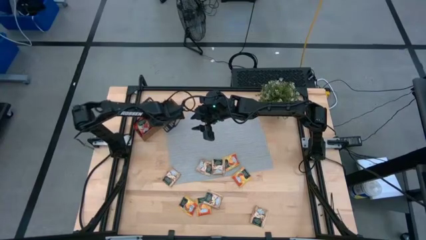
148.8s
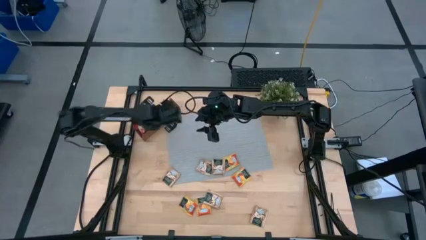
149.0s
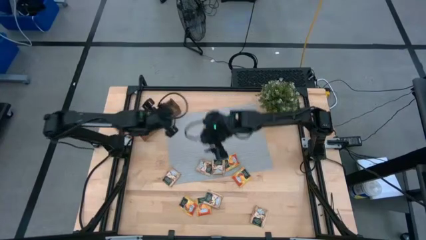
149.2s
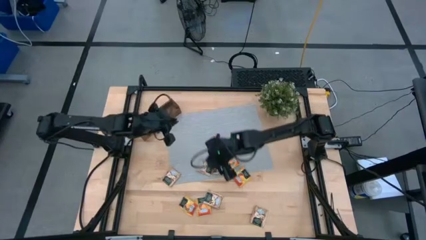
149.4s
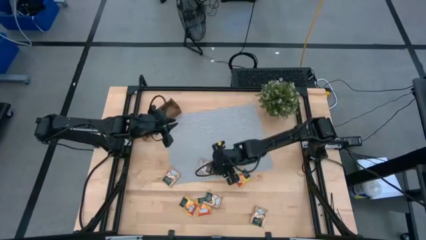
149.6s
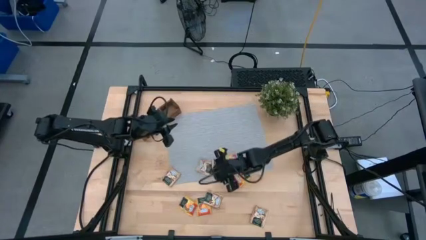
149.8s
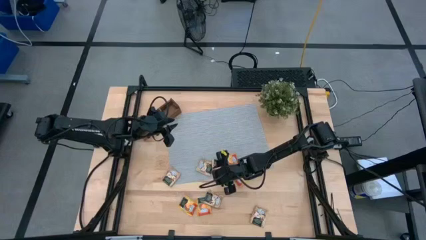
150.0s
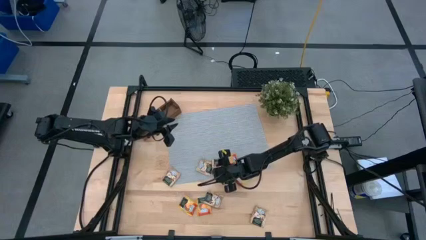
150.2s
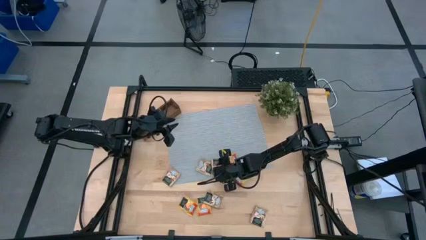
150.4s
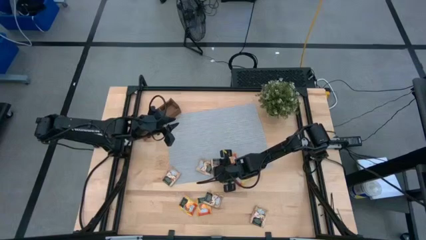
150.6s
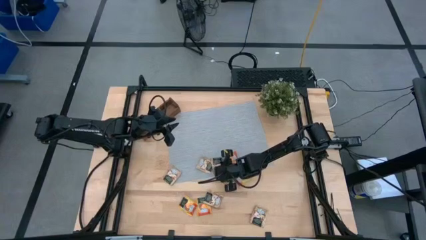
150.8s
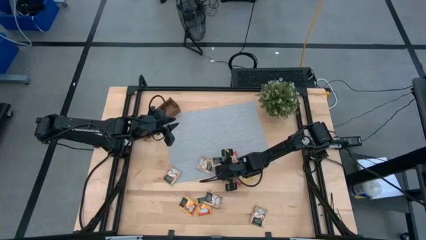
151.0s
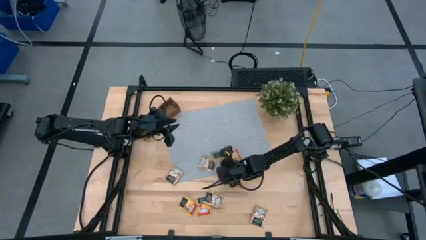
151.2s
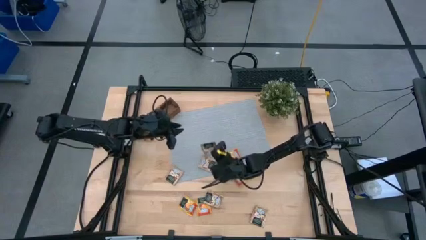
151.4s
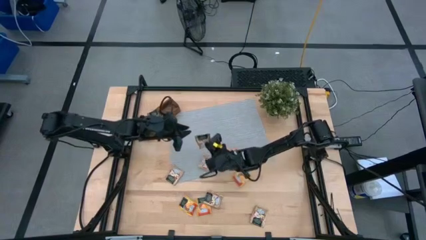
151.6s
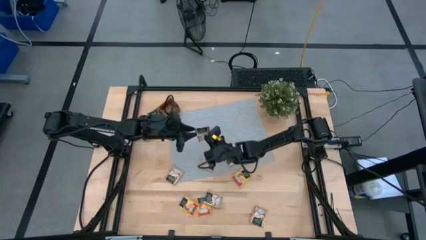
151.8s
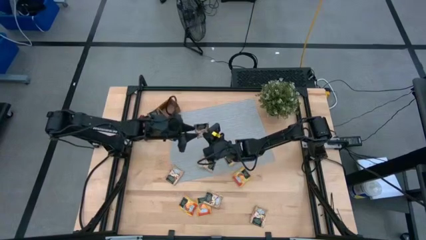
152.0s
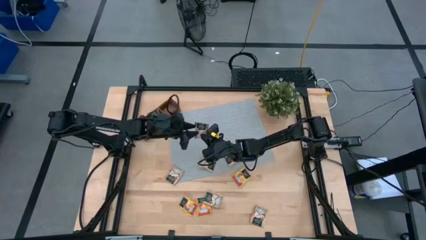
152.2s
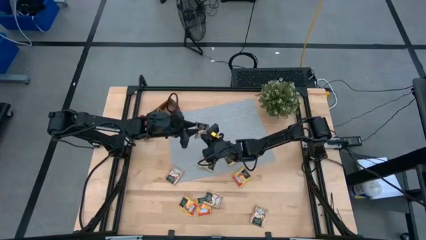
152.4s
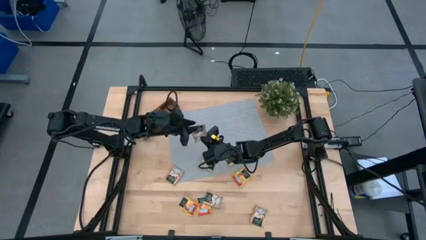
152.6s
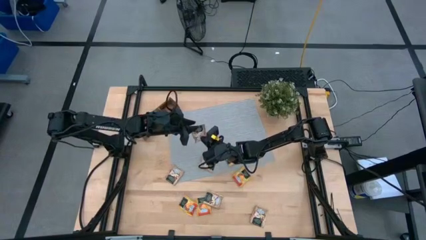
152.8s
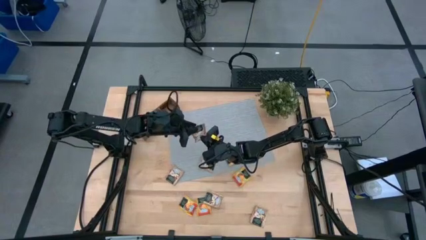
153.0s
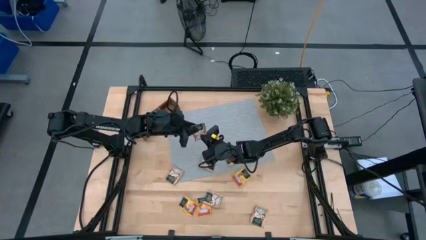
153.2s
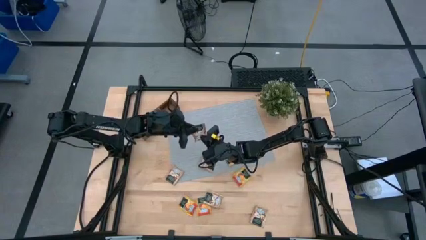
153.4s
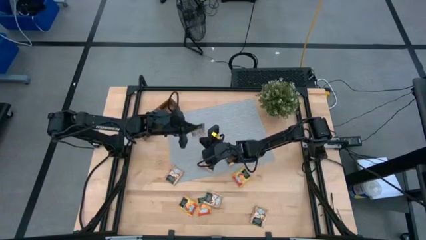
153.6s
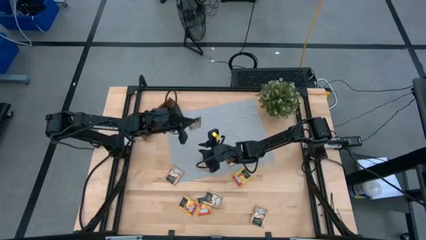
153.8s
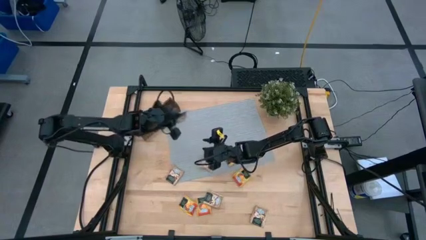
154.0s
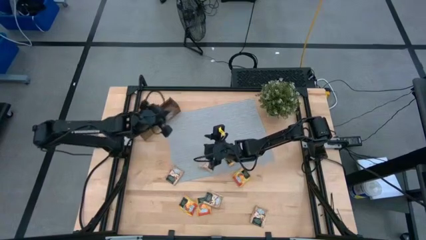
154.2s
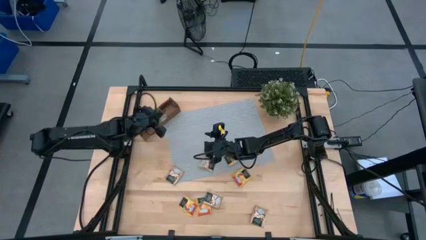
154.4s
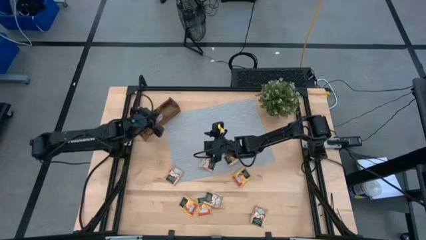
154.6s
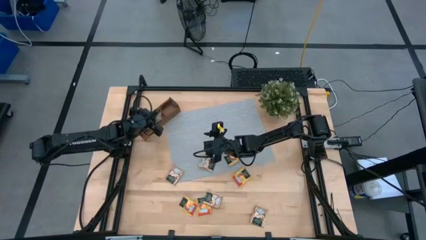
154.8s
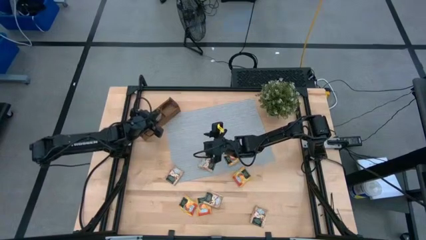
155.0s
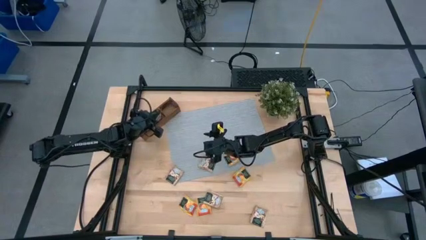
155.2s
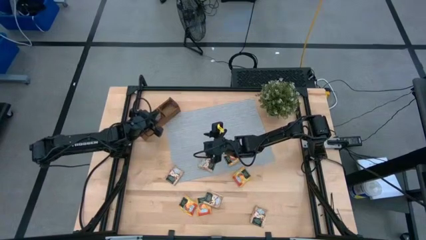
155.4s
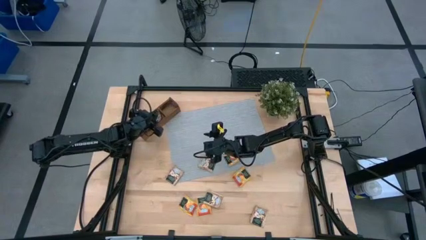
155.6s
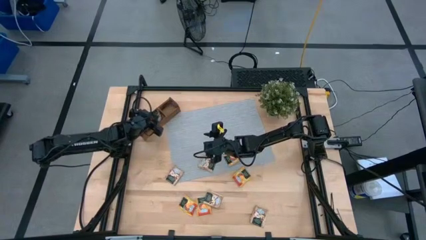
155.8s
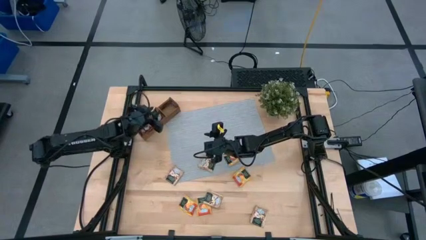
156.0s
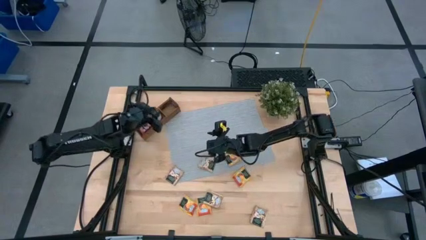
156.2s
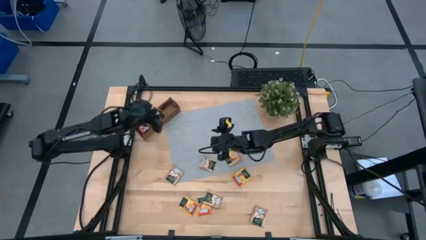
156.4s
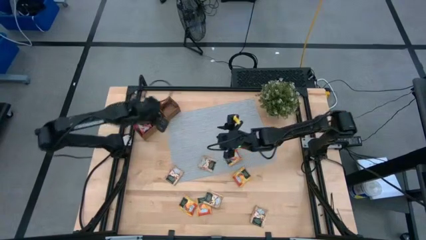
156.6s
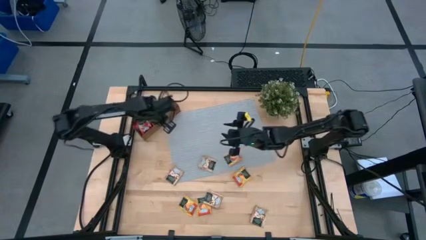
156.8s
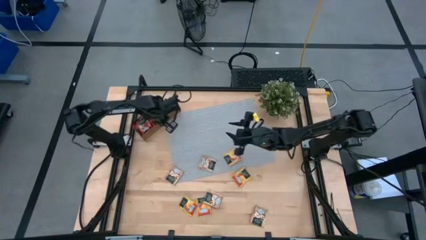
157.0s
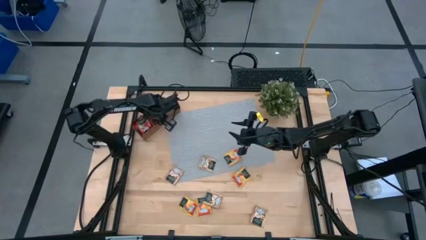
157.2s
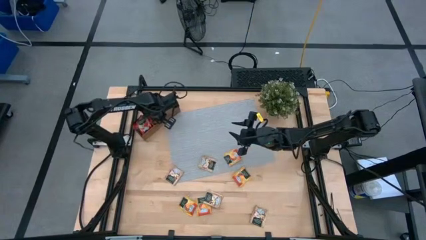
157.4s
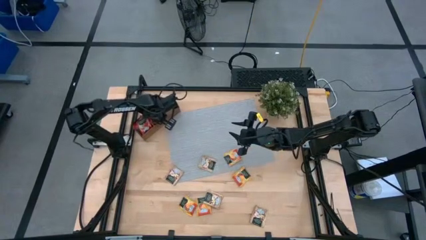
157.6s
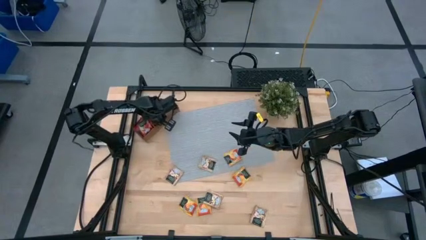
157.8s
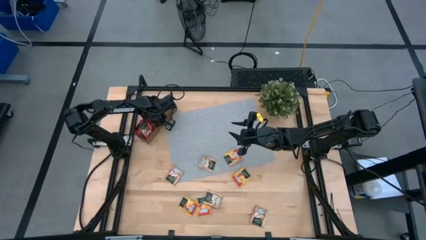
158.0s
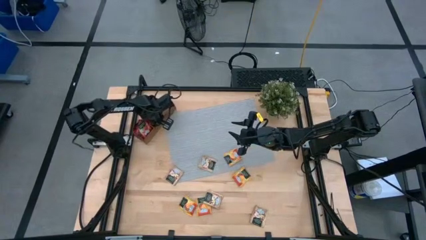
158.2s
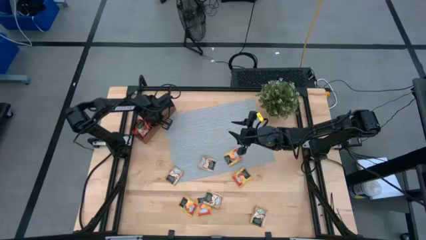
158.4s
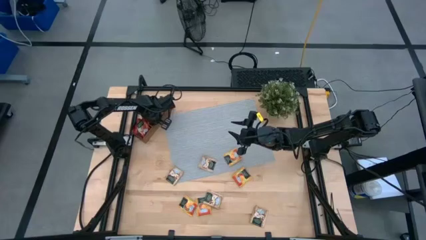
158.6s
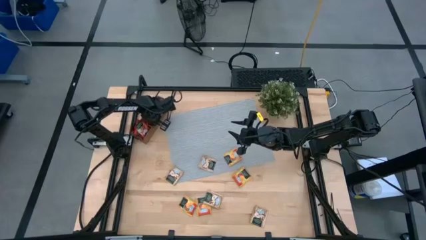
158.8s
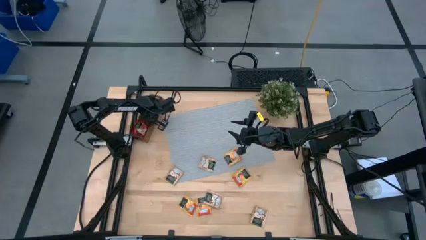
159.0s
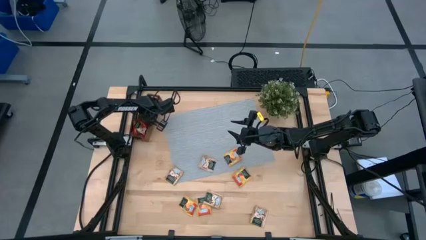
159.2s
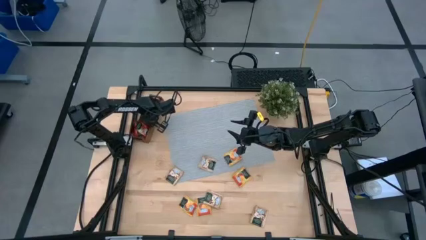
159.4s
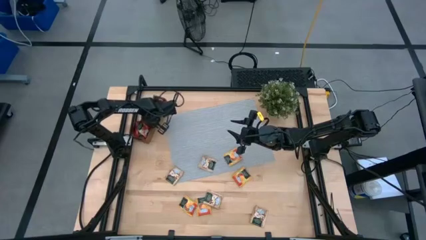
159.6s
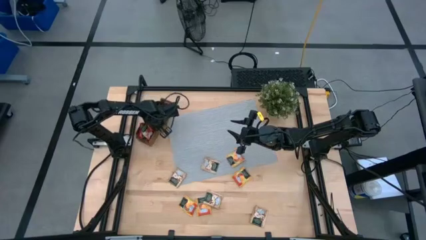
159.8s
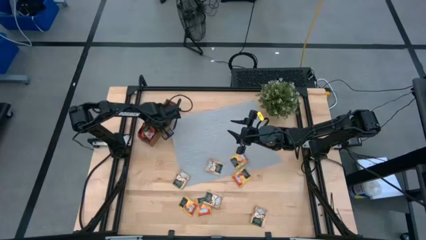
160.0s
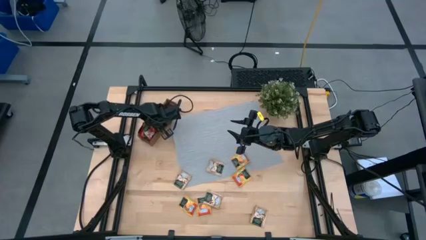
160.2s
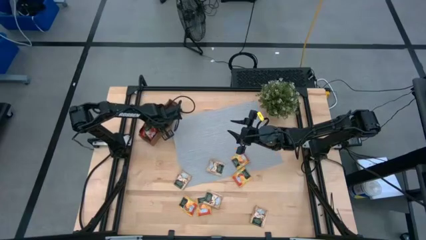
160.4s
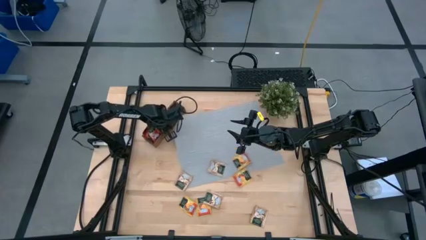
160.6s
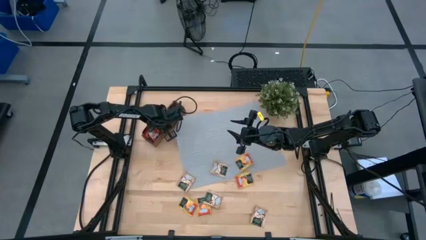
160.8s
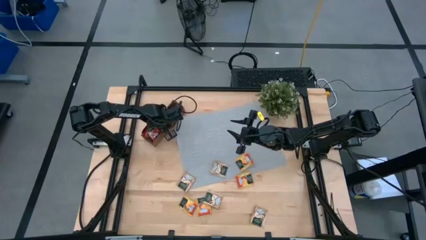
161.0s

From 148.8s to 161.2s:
Task: Pick & Place Tea
Put the brown tea bag into the middle section of the wooden organizer

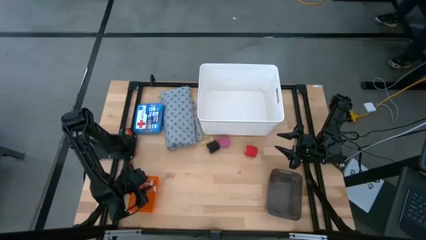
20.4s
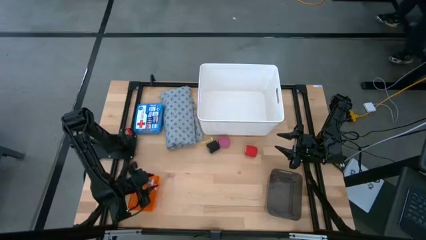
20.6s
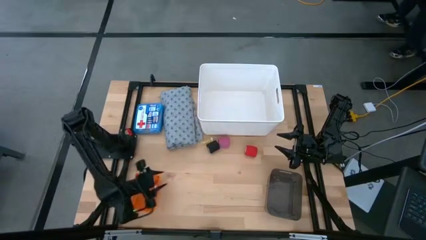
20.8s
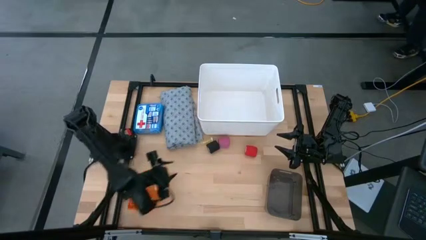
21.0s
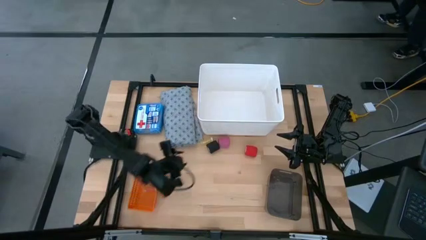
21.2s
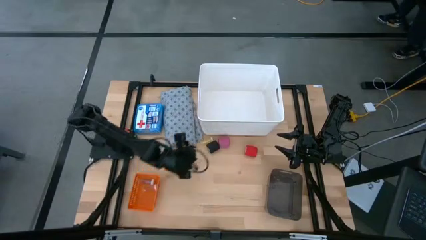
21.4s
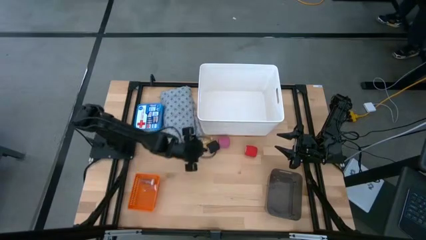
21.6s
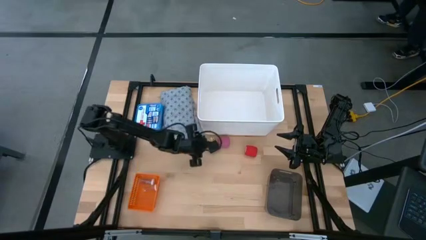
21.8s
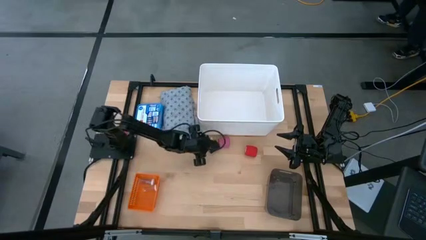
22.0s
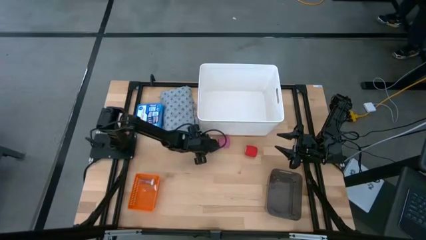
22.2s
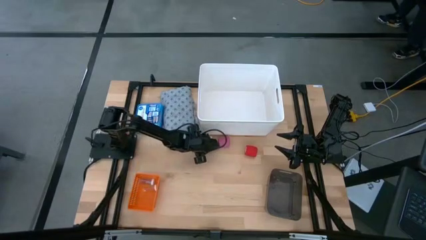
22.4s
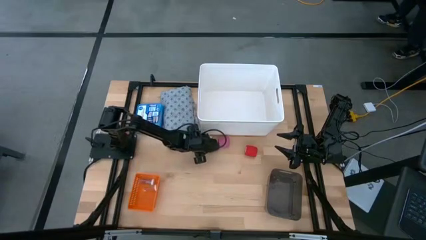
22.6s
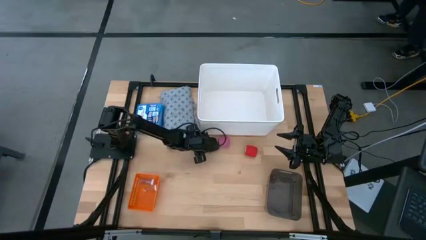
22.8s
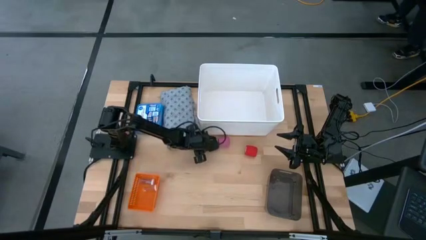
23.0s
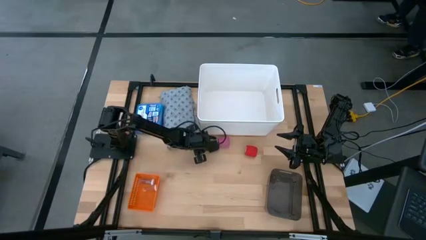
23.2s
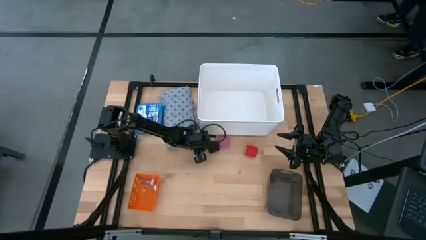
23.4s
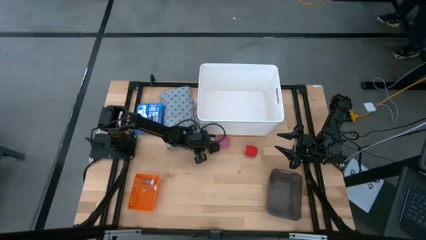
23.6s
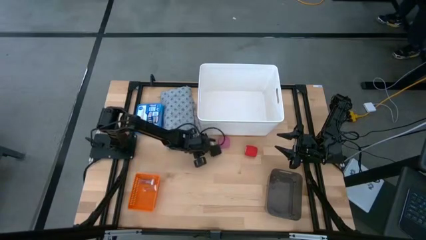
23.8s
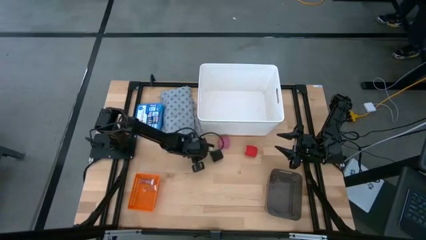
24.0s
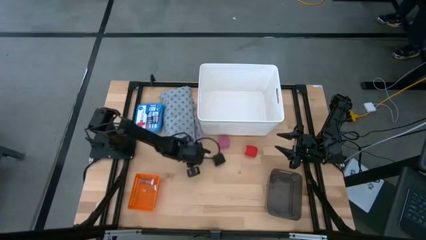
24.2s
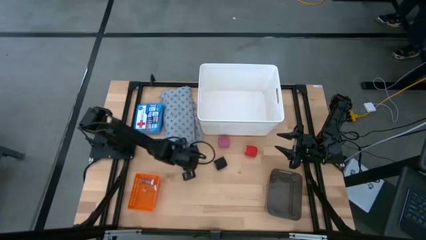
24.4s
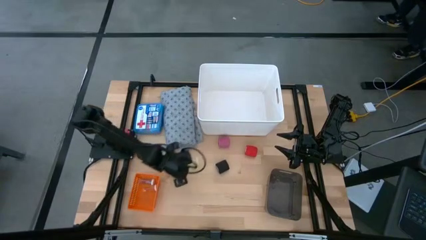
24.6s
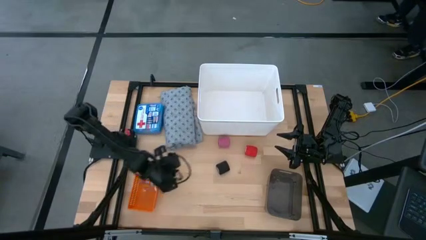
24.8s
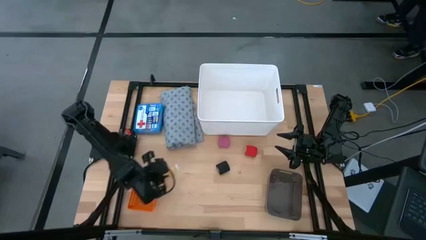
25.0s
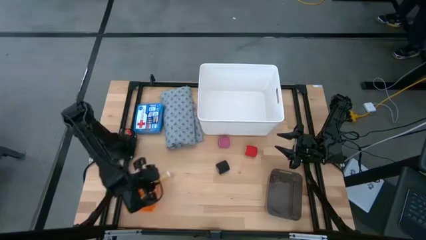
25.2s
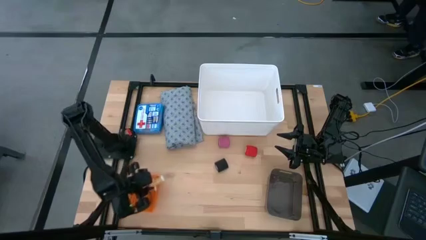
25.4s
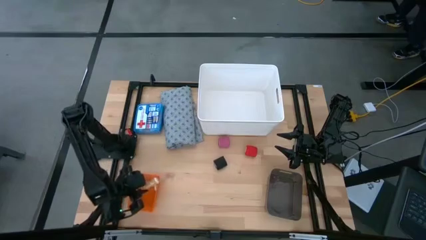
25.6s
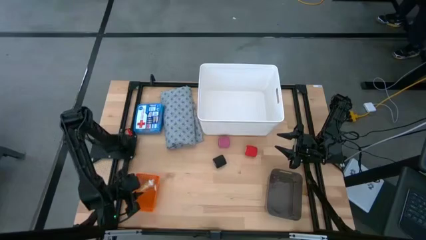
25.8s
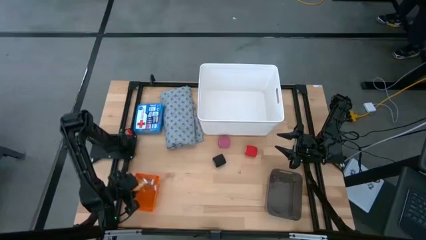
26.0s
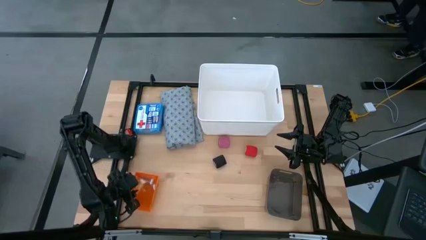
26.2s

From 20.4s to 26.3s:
Task: Pick & Place Medicine items
Put the yellow pill bottle into the orange bin
